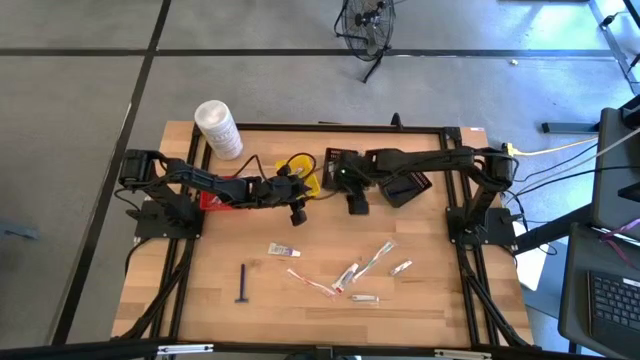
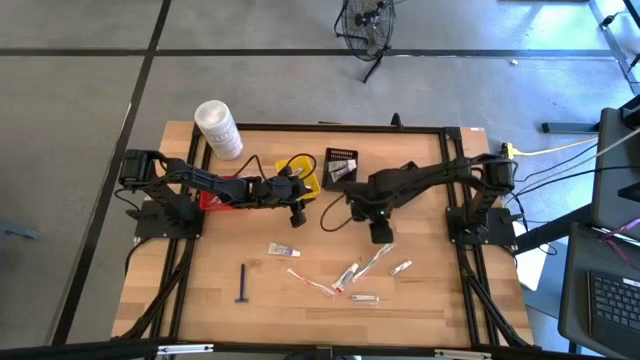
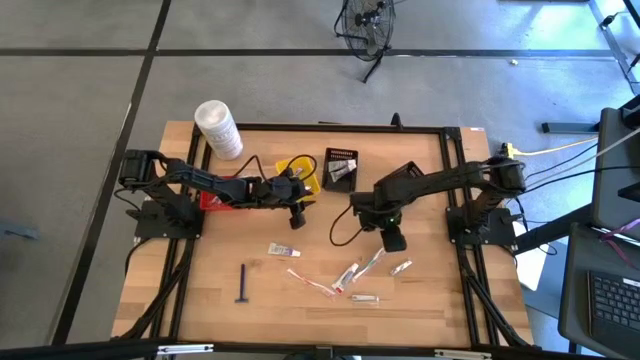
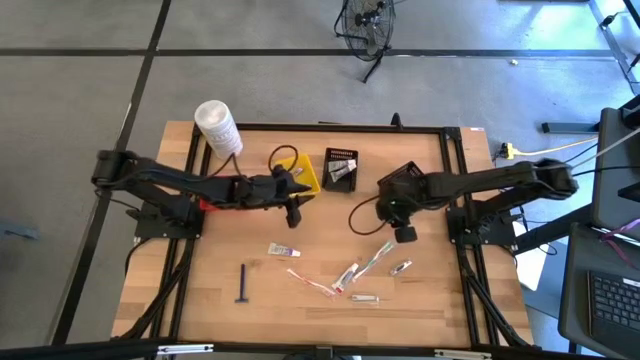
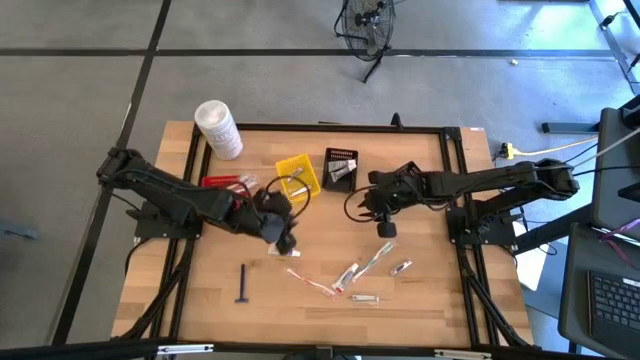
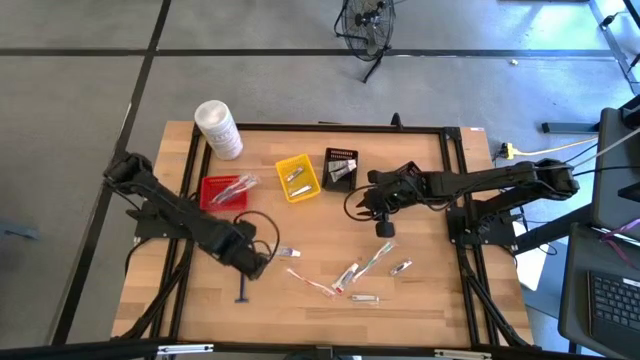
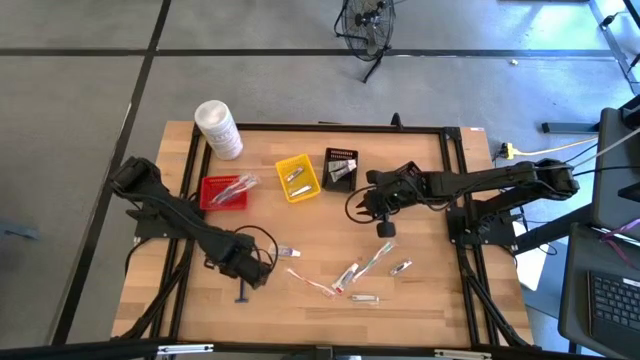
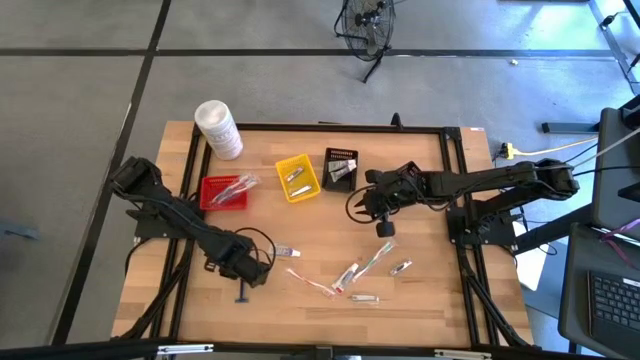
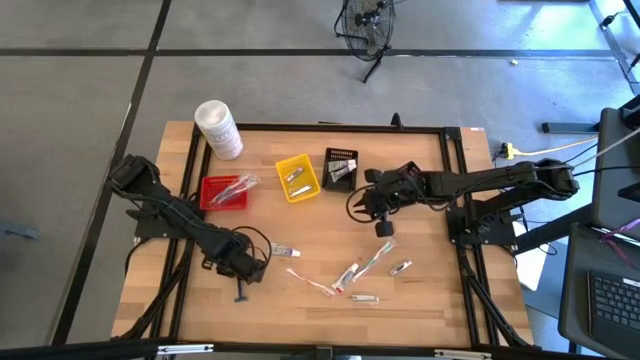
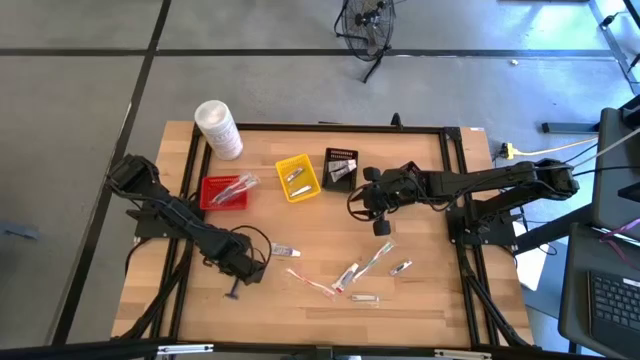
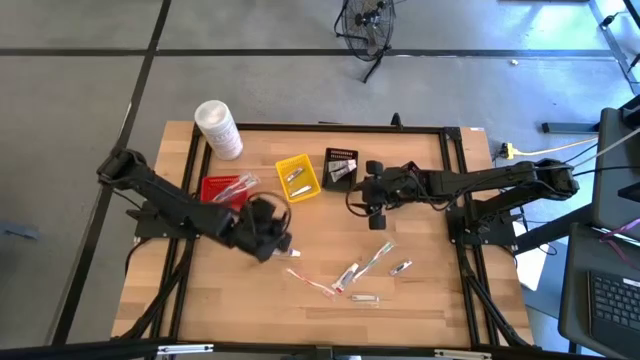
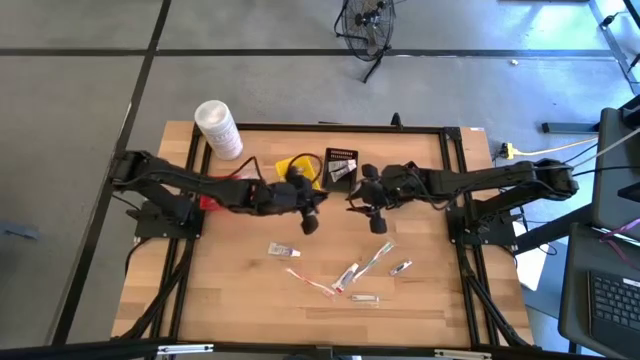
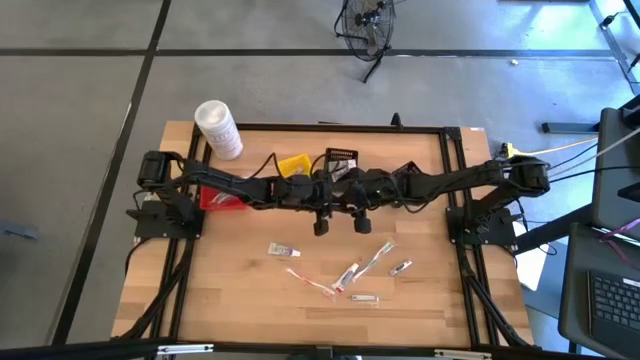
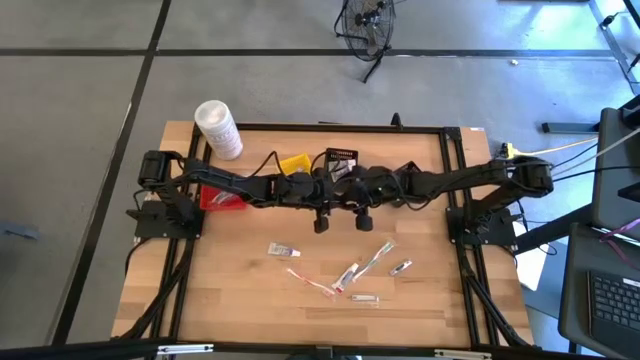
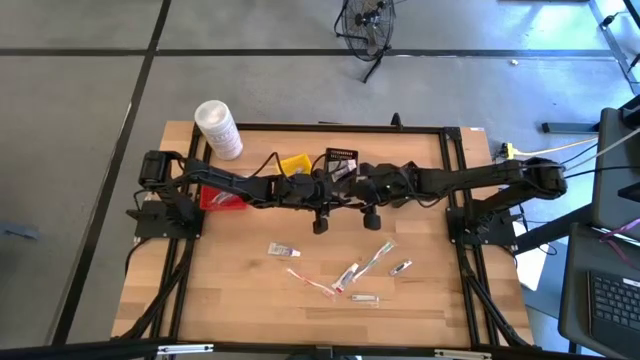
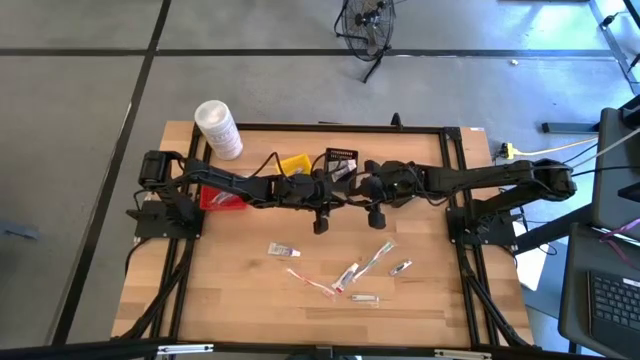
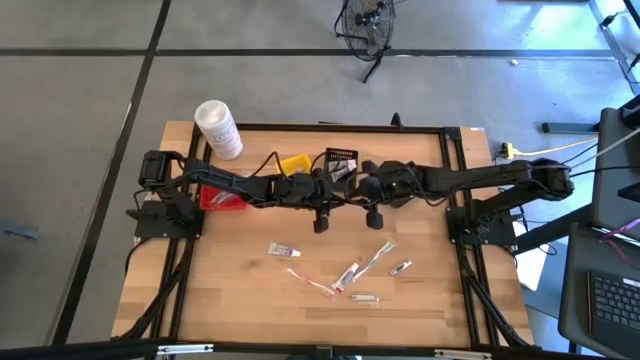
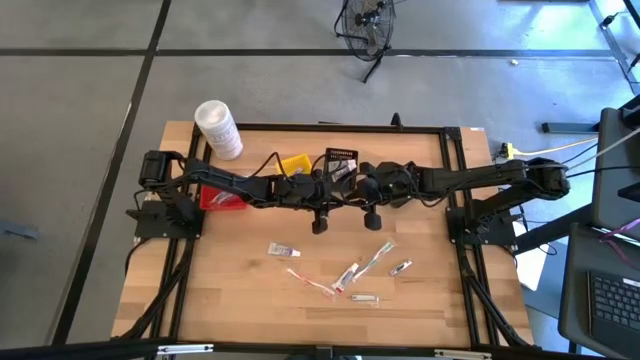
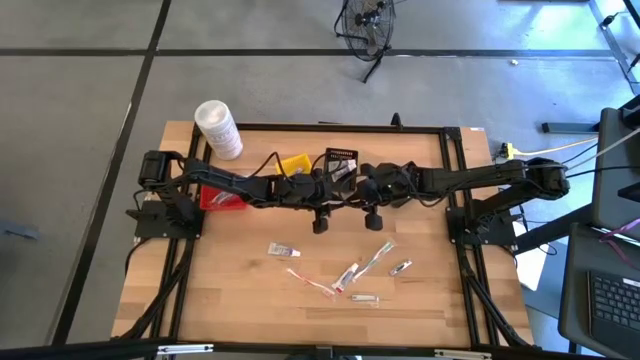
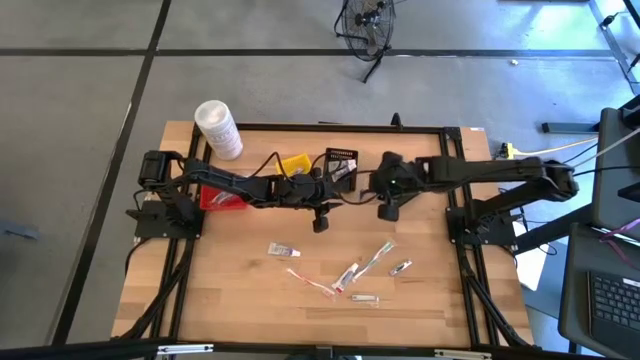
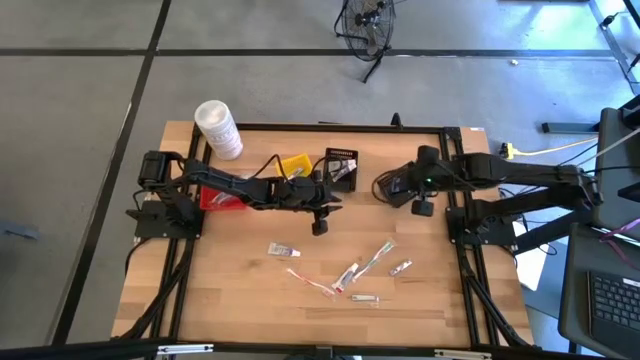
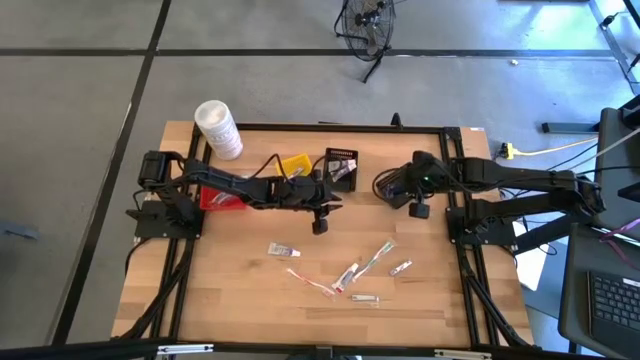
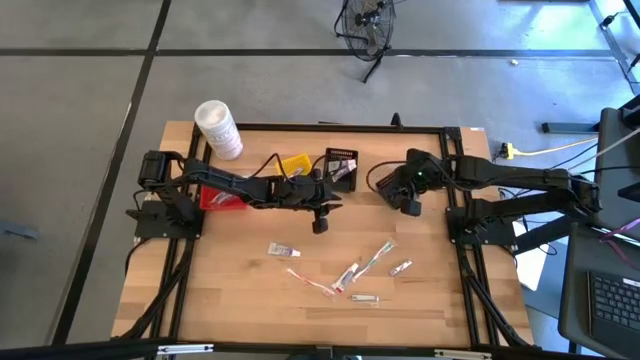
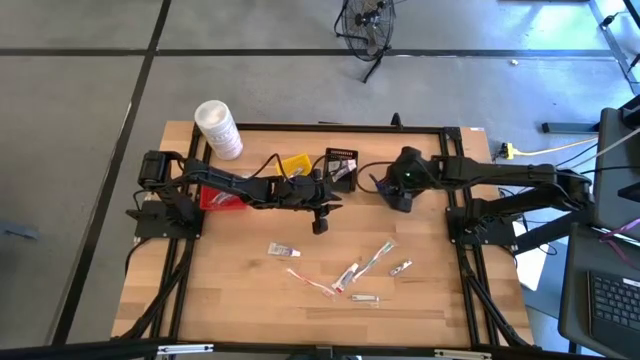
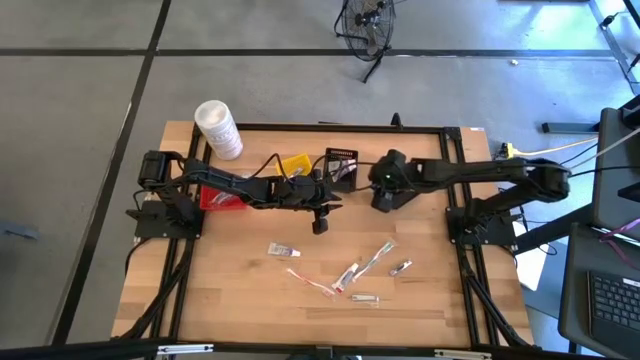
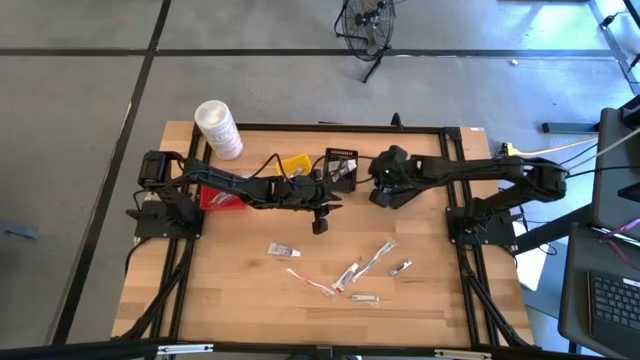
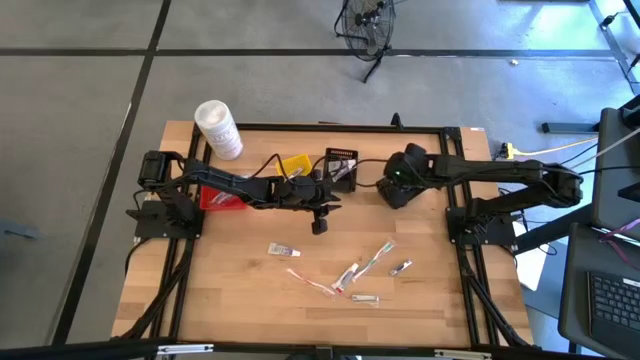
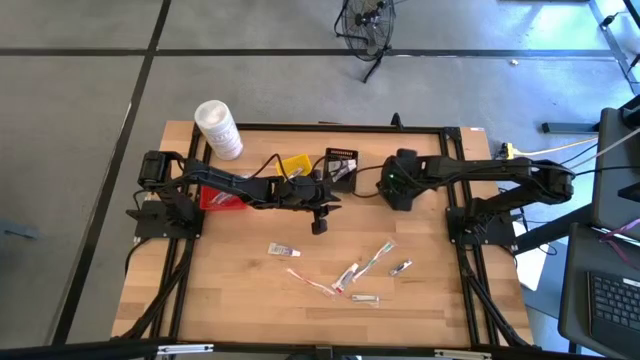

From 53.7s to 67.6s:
Task: Pick & Place Travel size toiletries
Put the razor into the right black bin

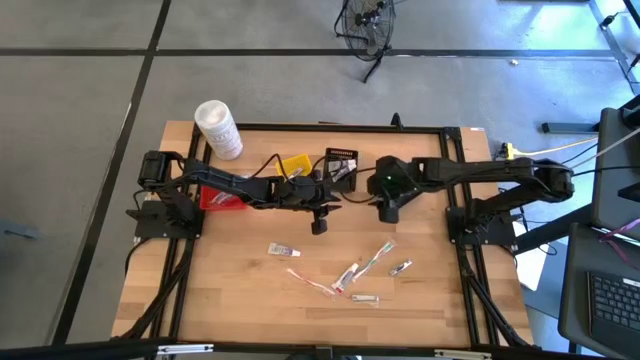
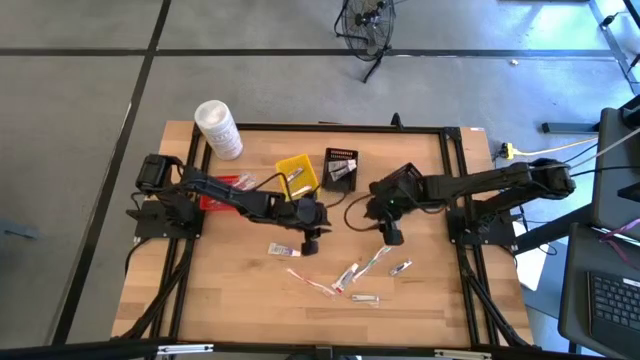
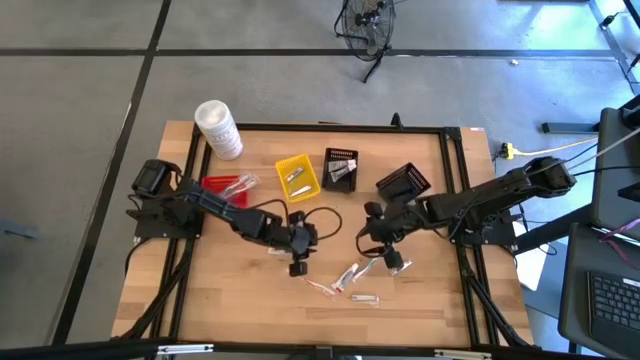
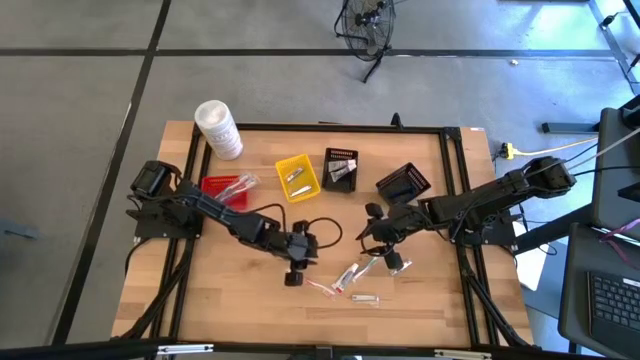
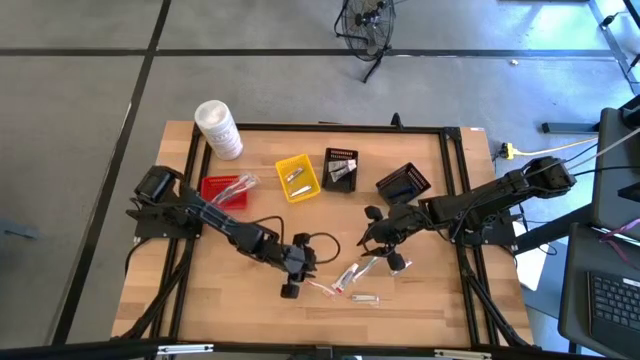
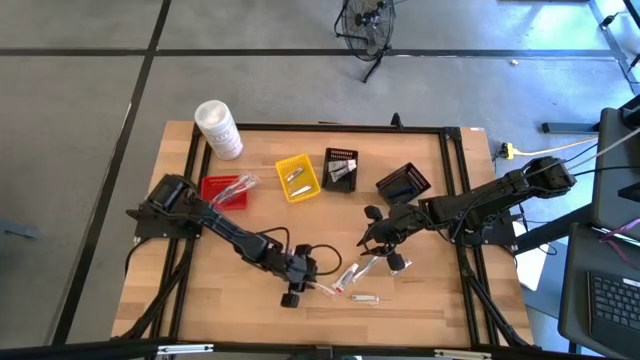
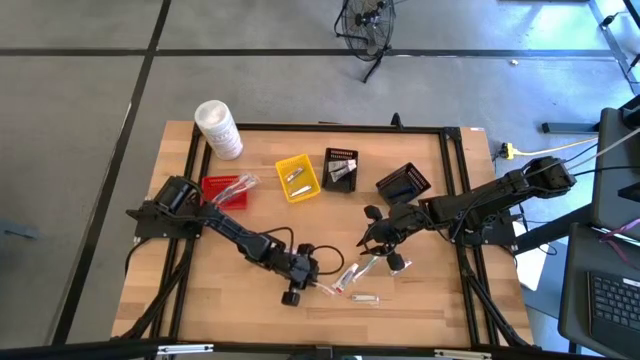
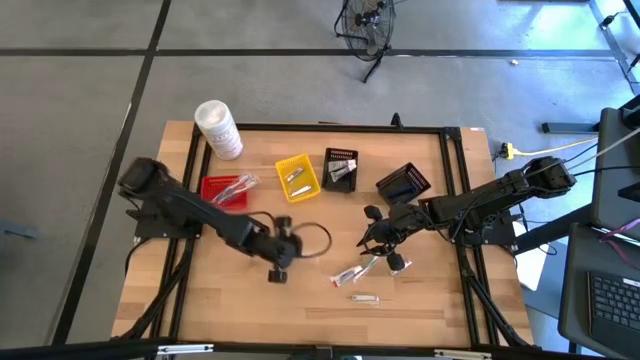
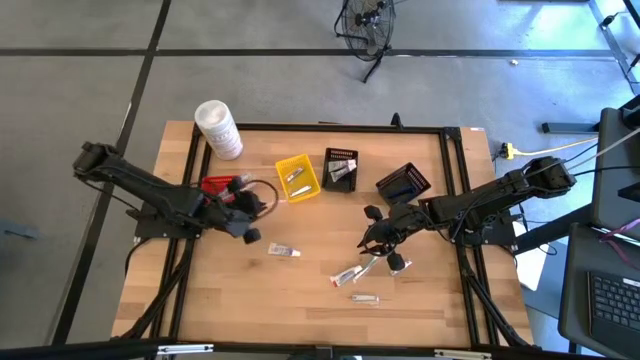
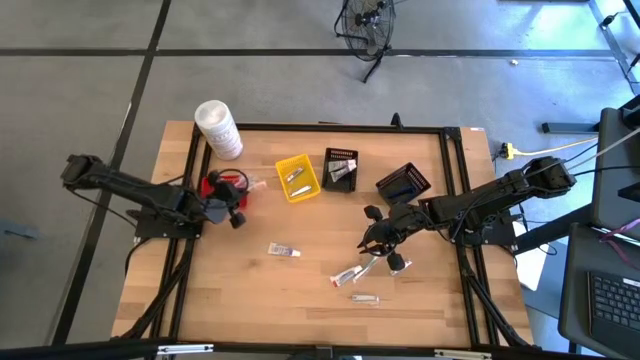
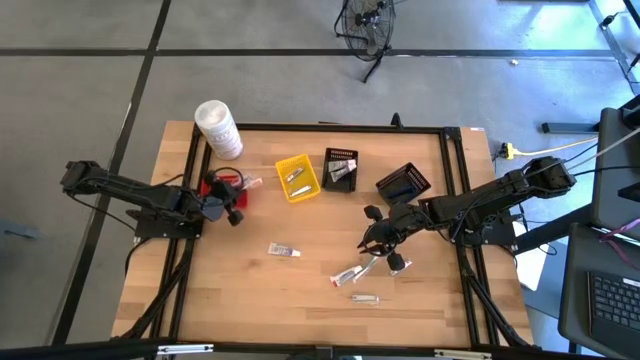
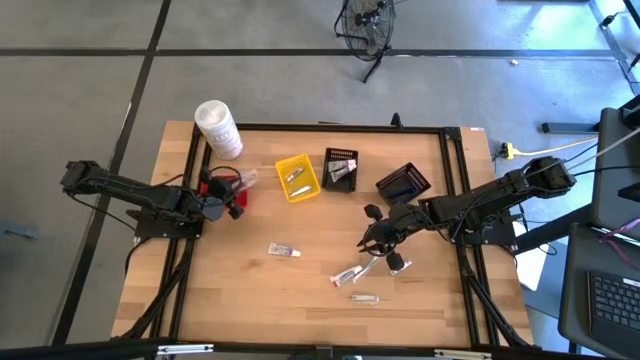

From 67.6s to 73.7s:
Put the red toothbrush into the red bin
